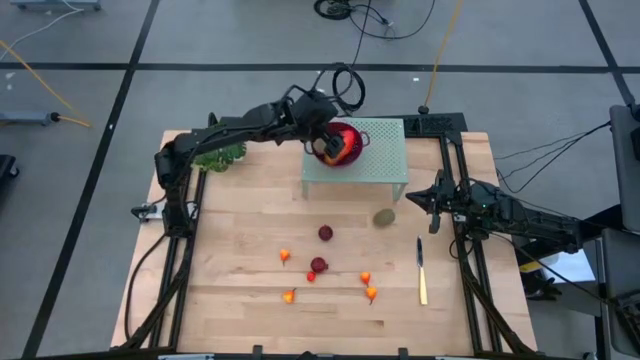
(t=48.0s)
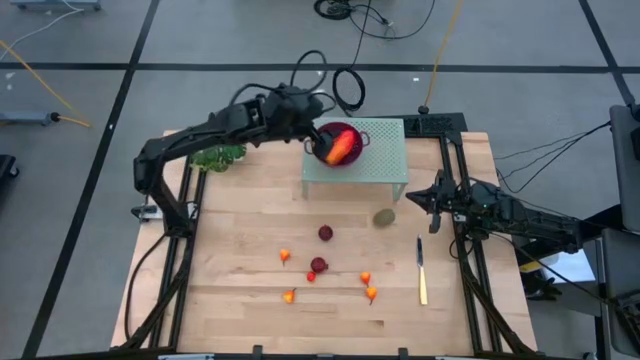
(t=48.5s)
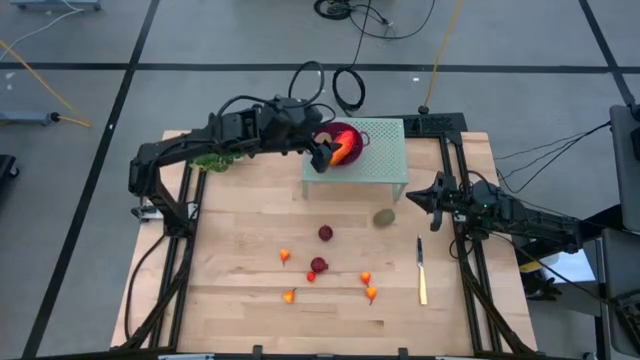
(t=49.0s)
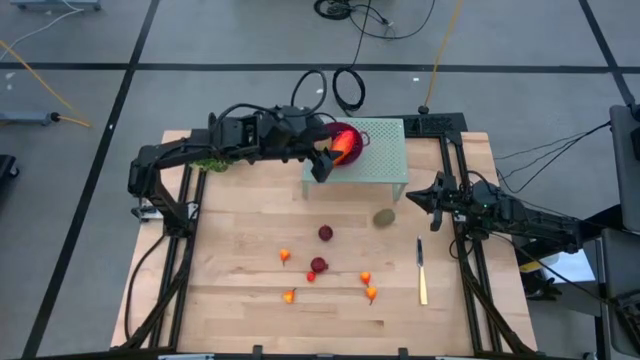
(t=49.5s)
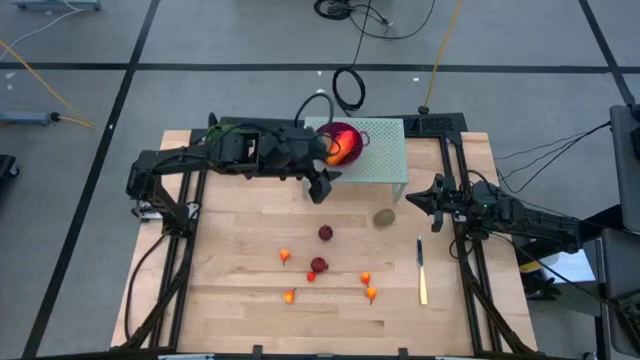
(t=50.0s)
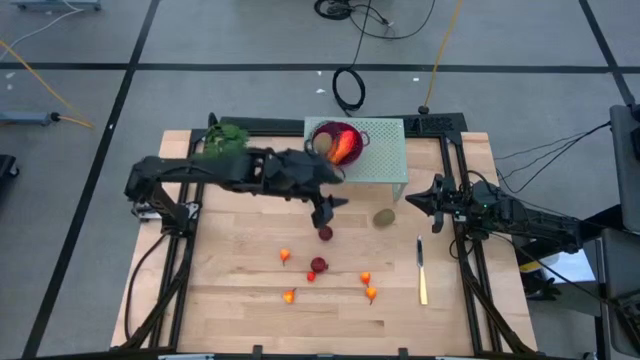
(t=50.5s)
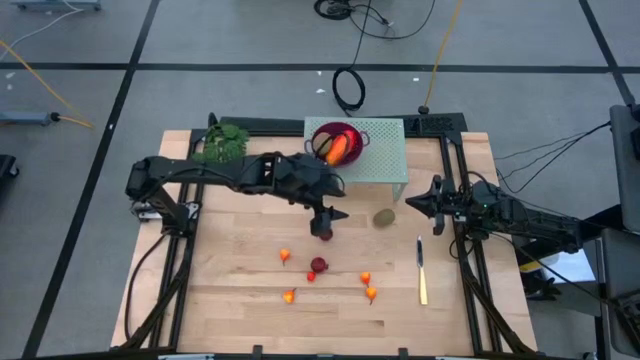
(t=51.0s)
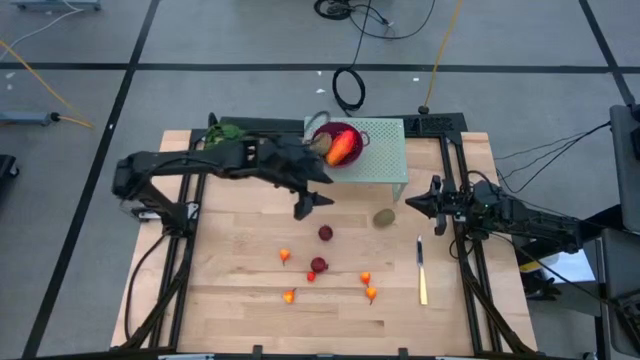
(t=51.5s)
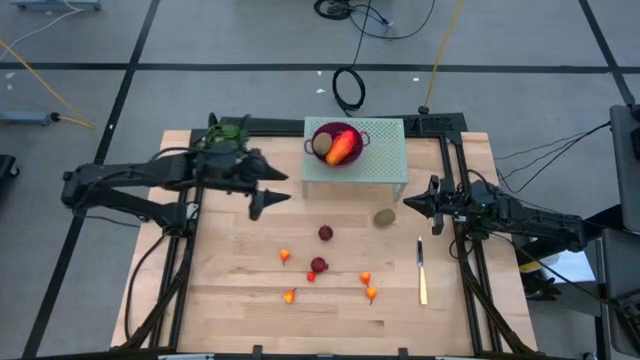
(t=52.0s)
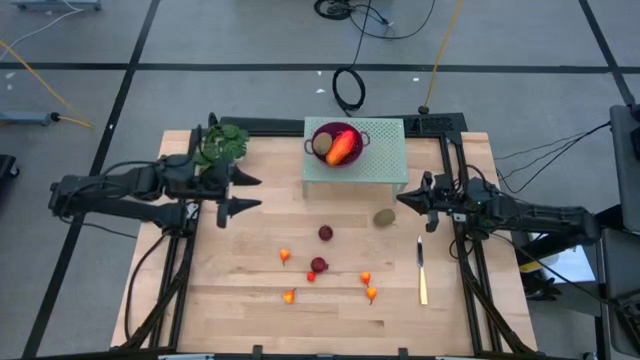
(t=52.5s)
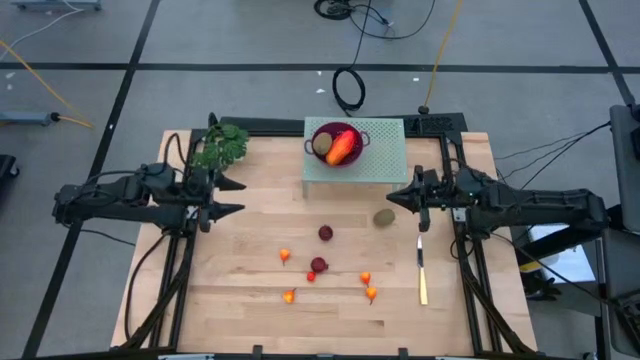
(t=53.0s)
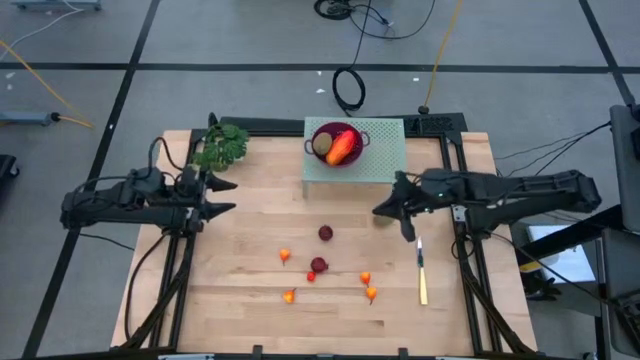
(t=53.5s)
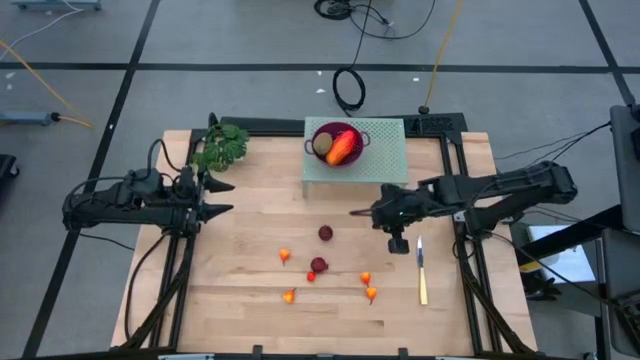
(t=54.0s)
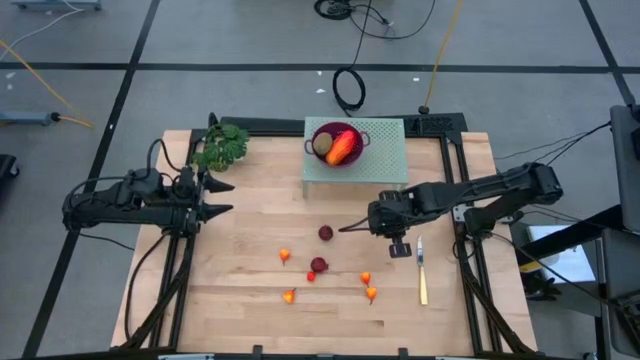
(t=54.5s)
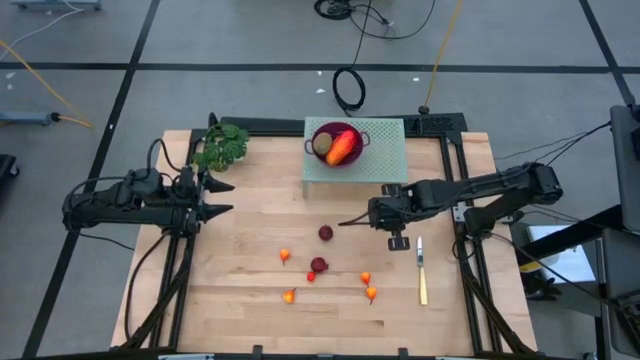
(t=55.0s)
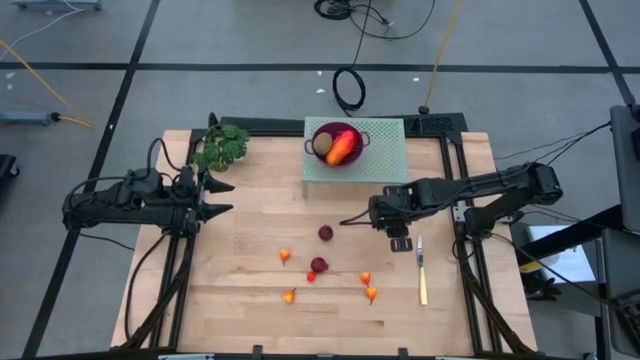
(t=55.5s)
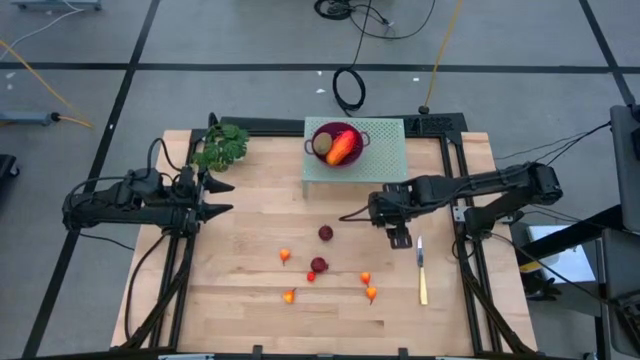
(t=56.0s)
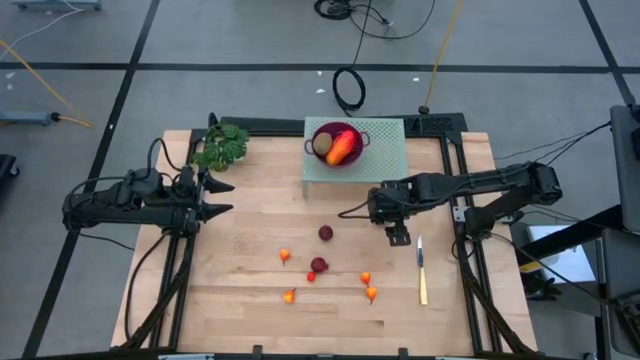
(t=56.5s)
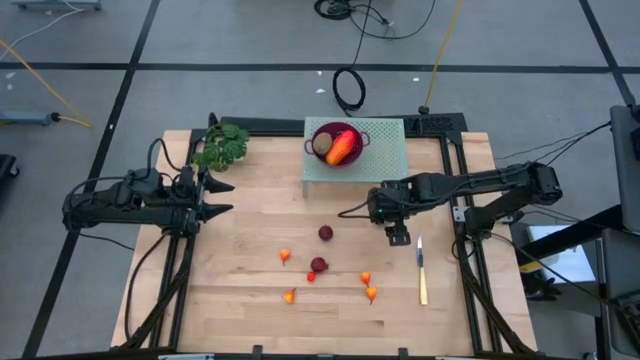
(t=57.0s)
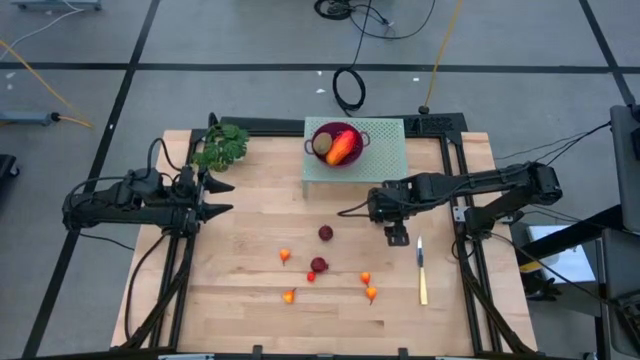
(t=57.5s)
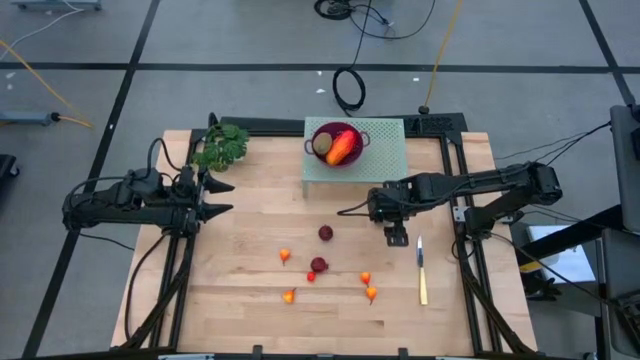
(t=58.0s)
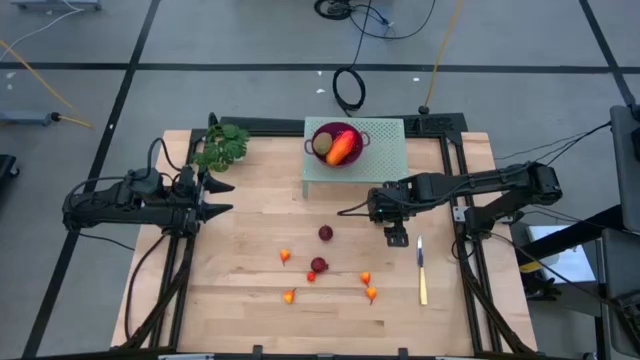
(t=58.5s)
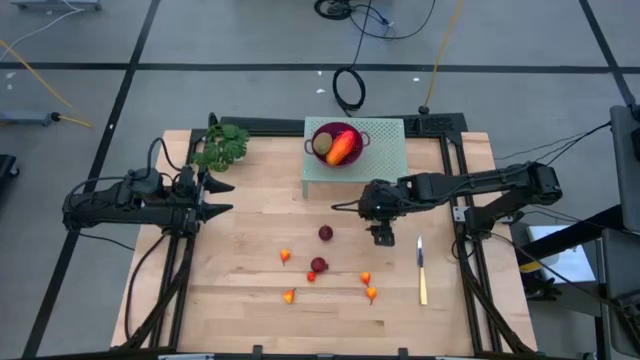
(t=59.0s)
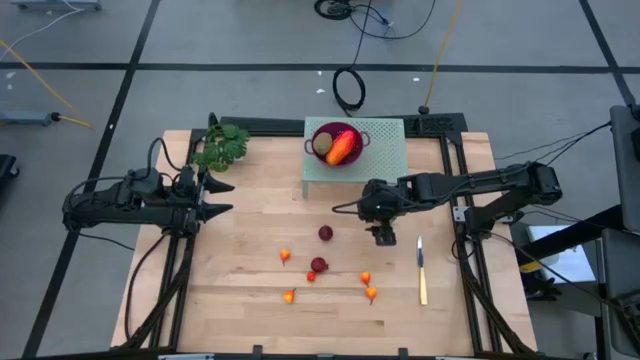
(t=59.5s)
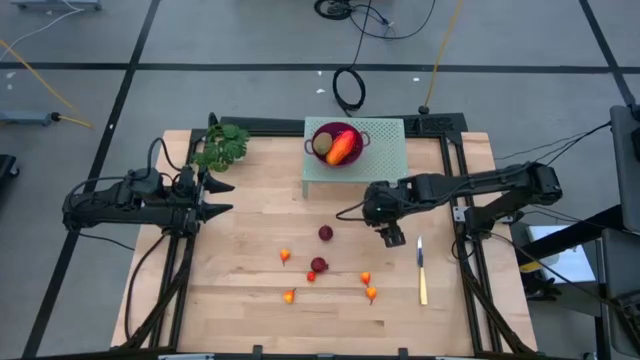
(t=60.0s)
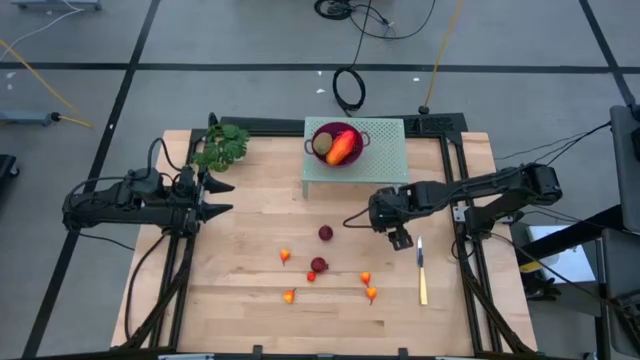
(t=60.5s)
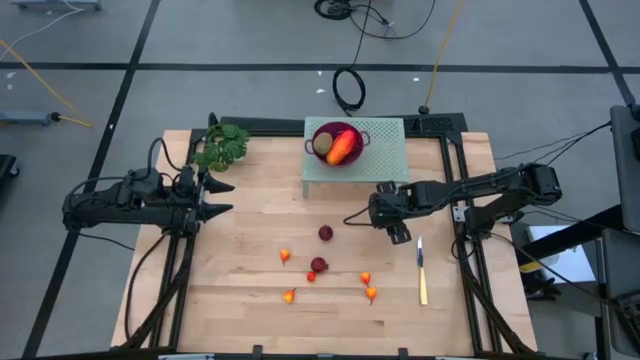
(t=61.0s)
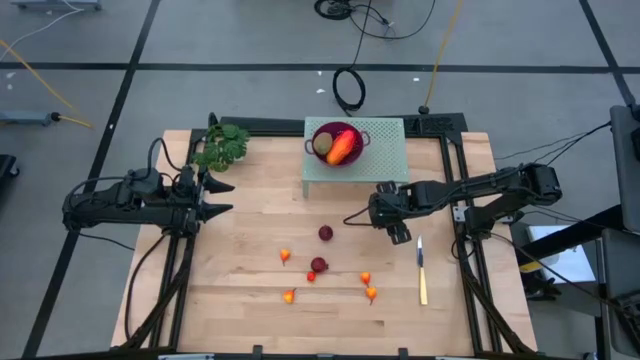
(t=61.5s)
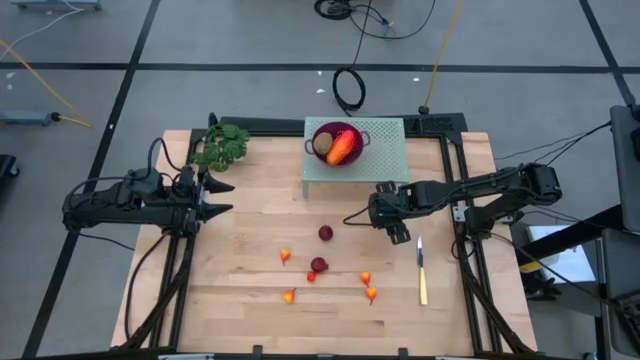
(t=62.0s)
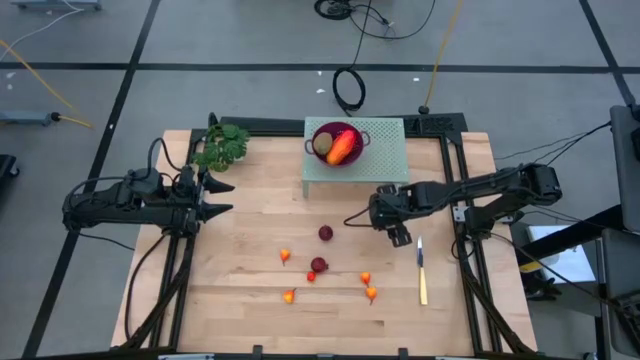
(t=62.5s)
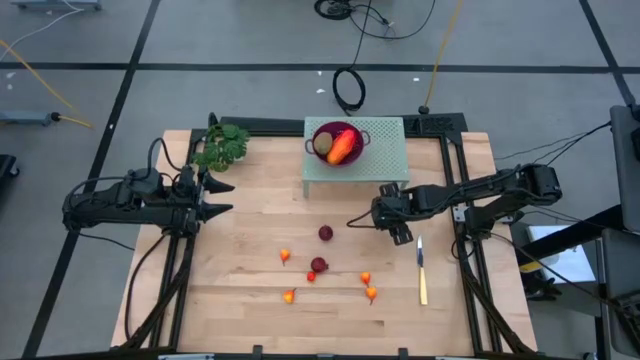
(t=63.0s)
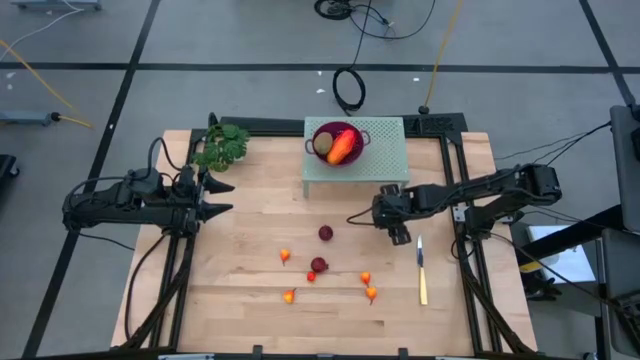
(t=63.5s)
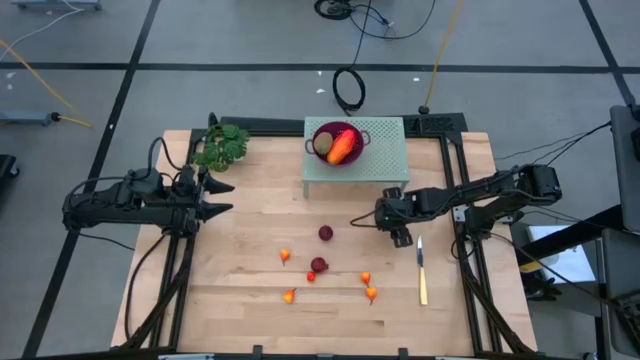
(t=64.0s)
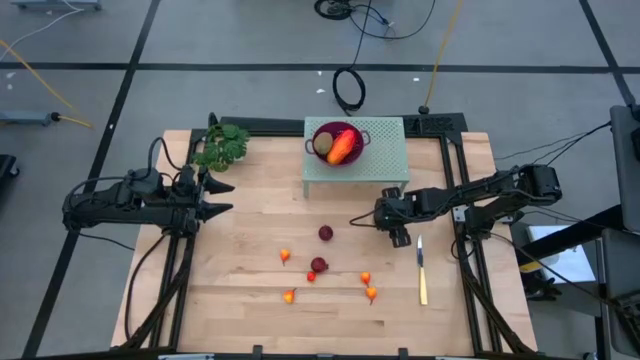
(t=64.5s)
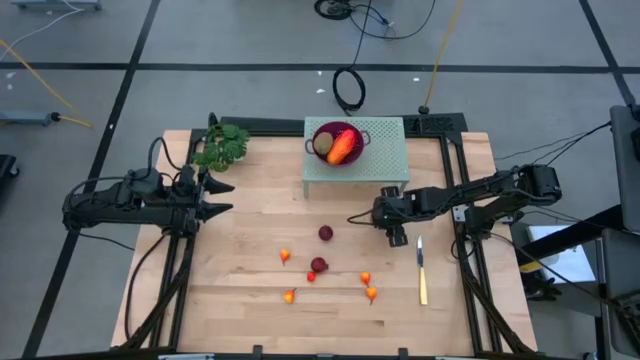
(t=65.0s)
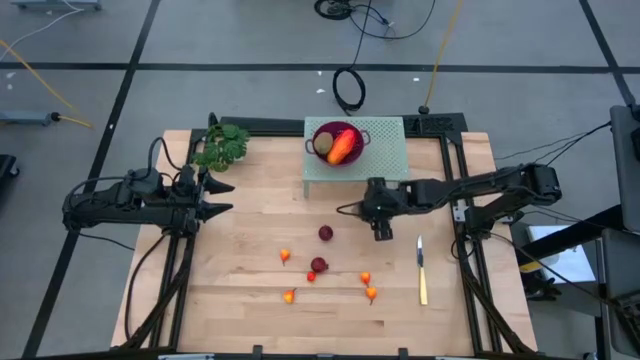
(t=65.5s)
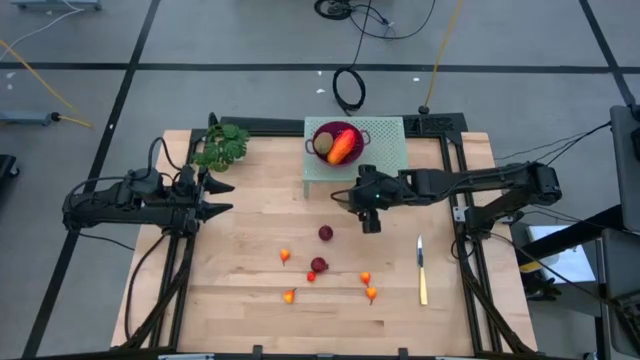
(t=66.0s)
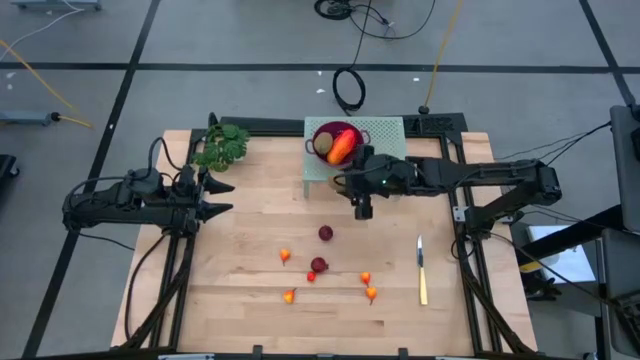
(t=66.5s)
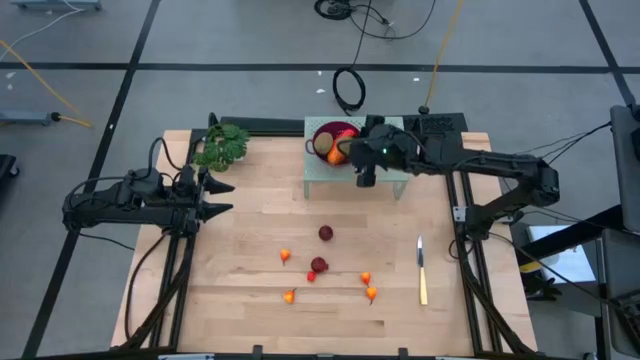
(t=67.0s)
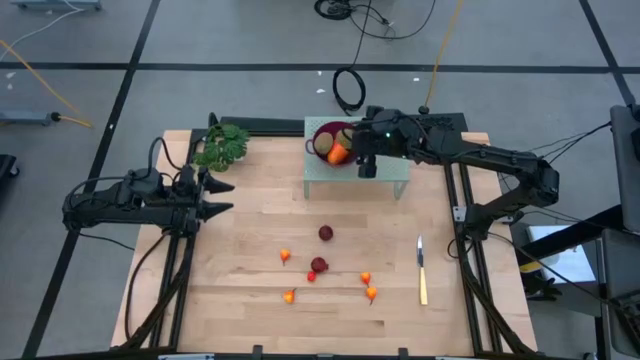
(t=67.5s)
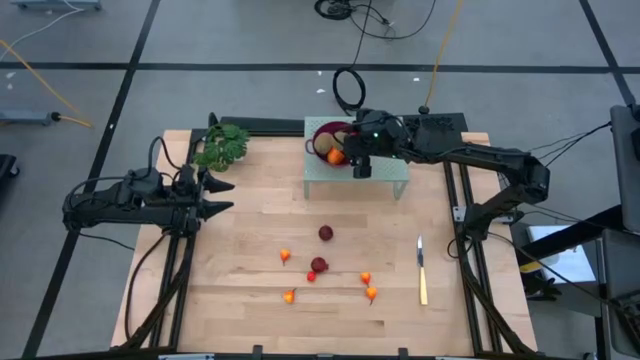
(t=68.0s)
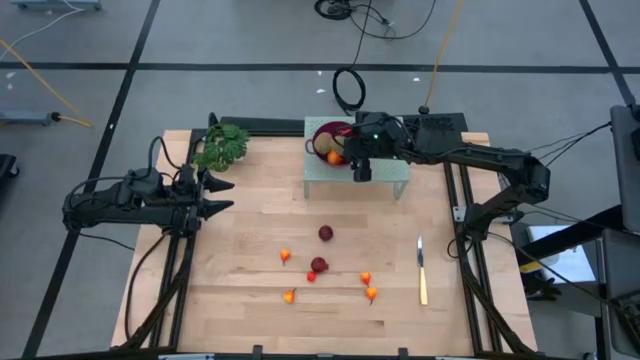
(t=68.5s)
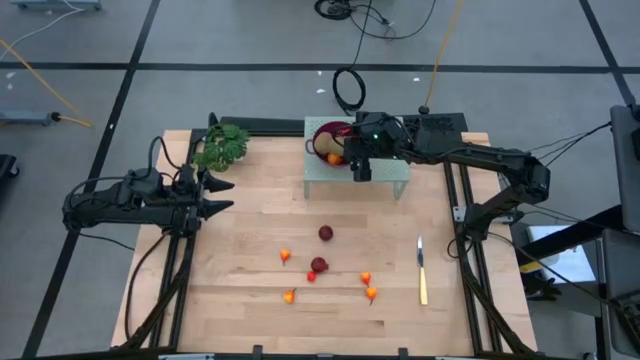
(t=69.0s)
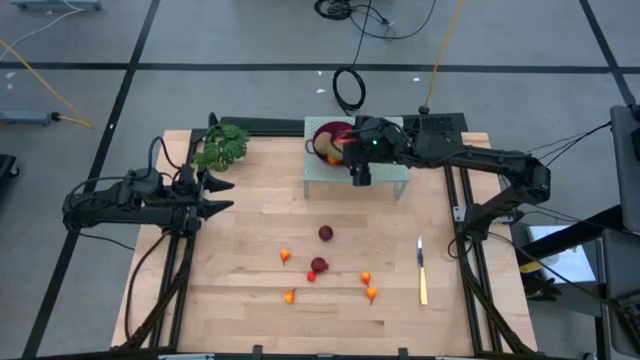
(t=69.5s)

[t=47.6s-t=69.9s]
Task: Pick & Place Fruit
Put the kiwi into the strainer bowl
